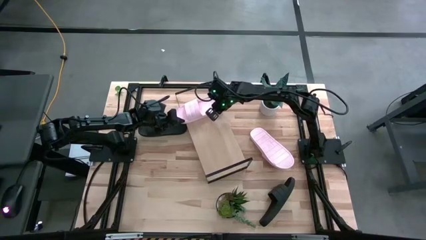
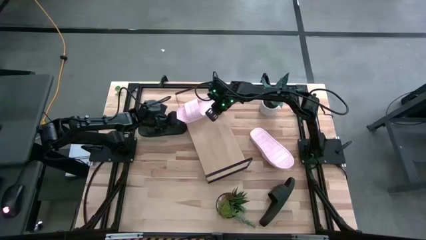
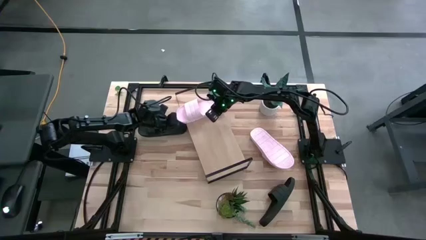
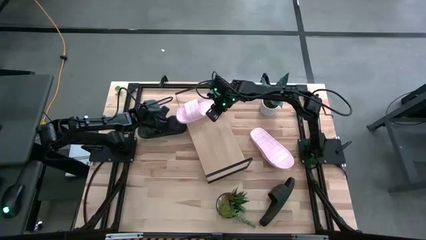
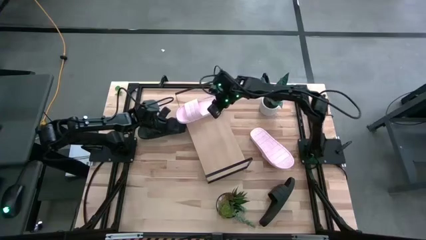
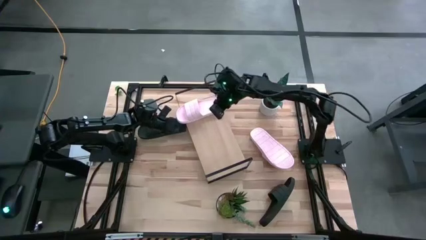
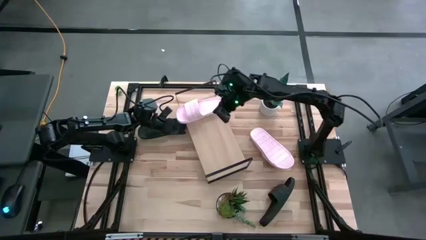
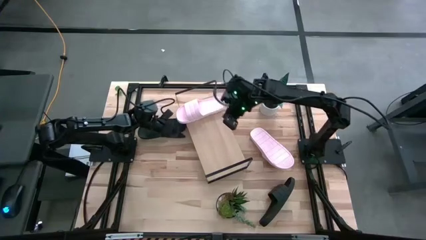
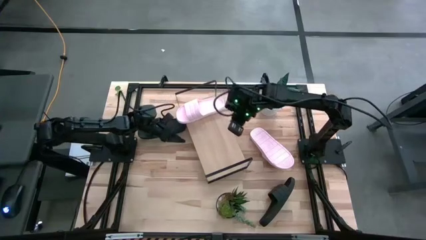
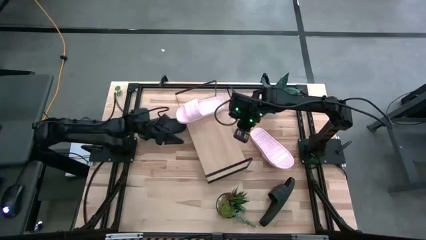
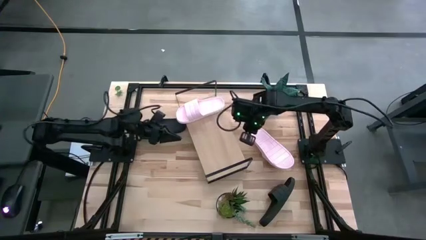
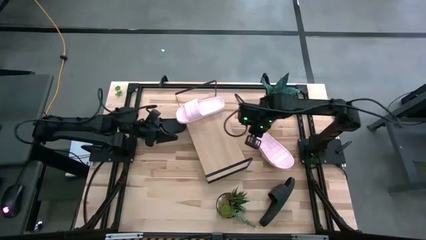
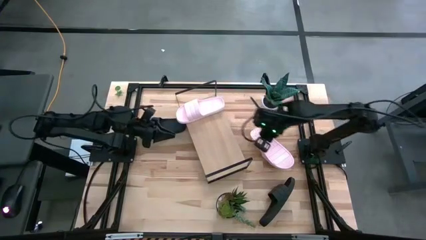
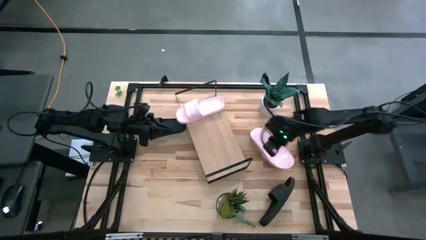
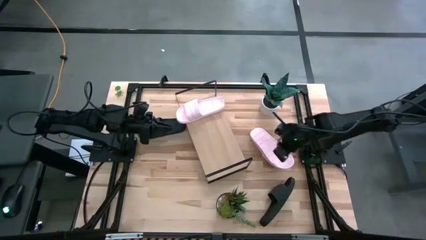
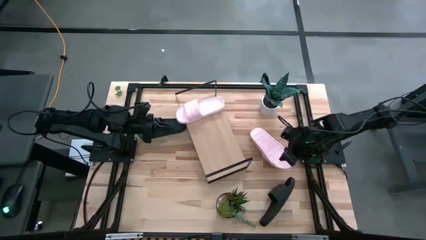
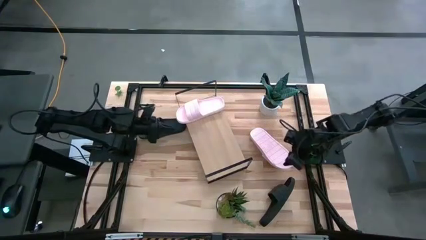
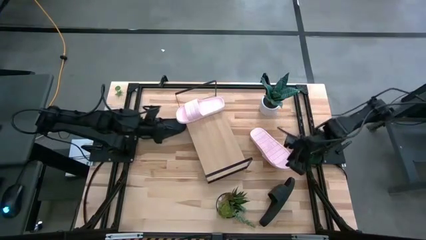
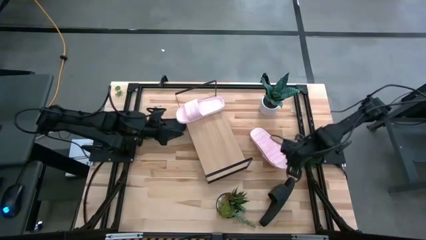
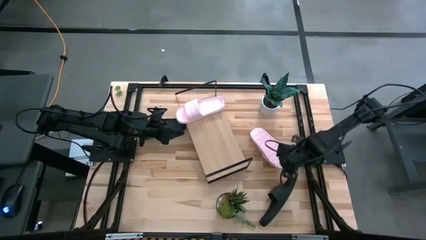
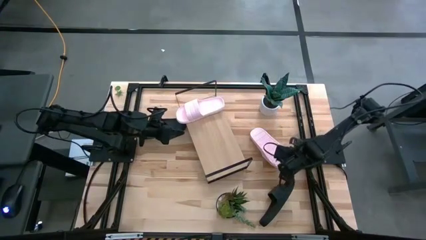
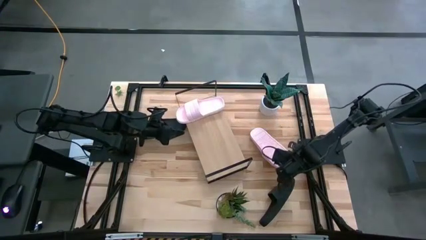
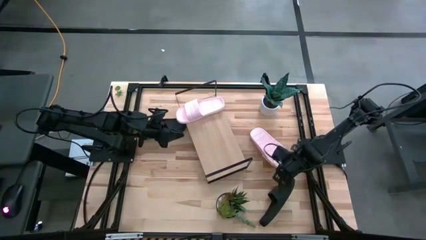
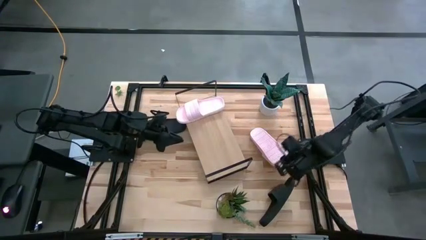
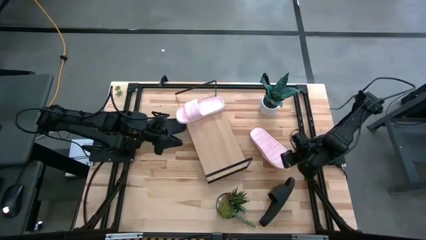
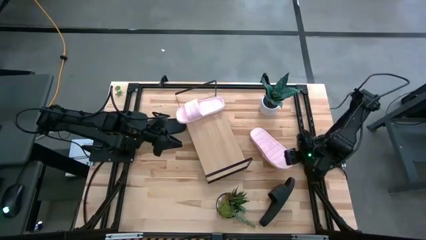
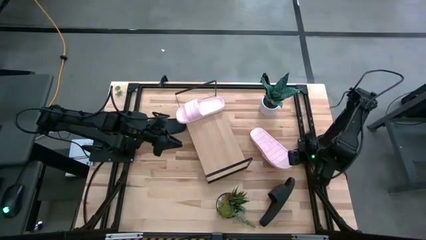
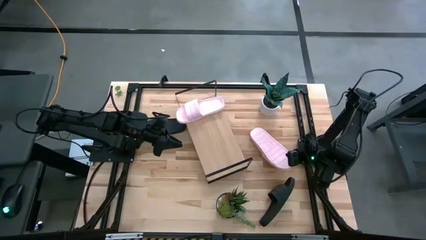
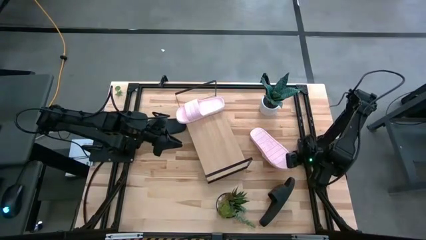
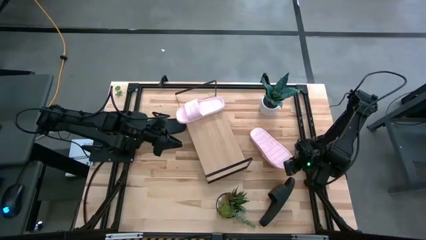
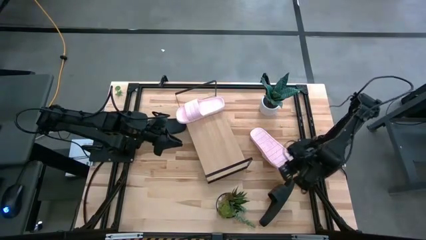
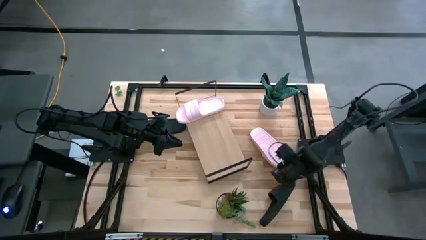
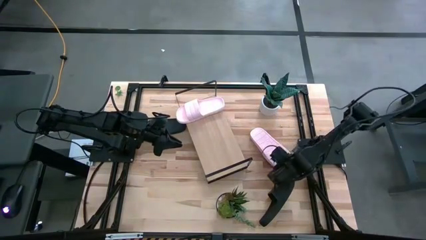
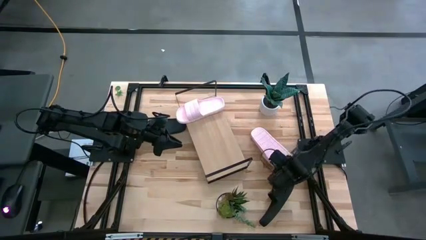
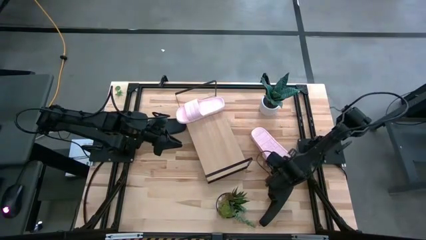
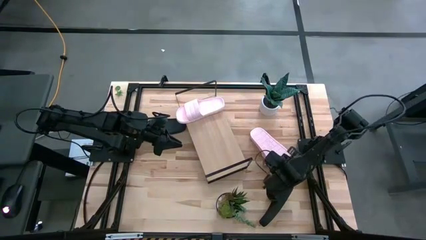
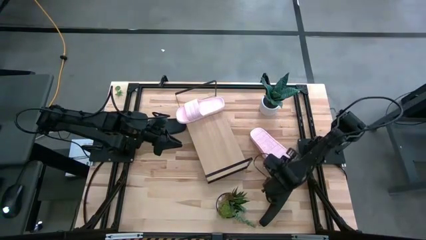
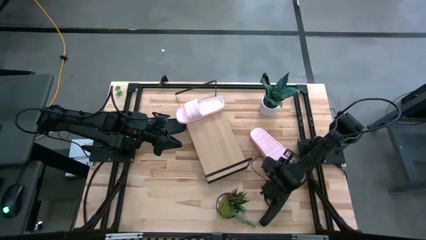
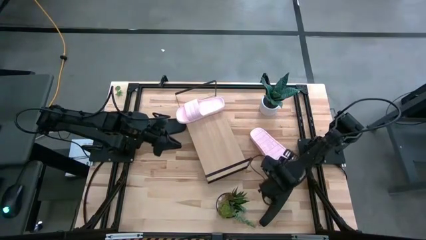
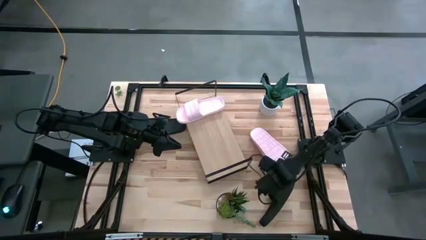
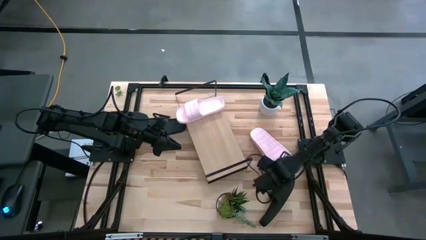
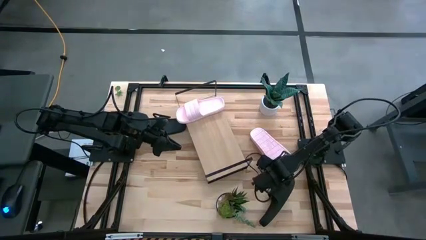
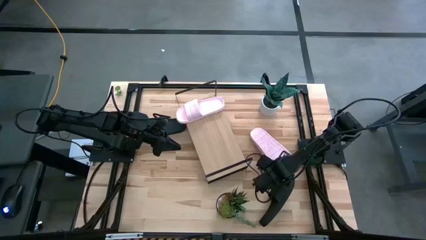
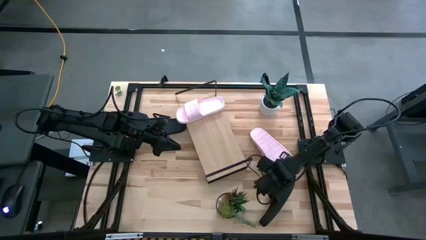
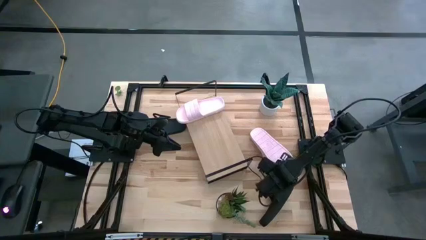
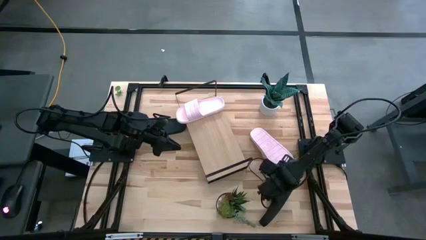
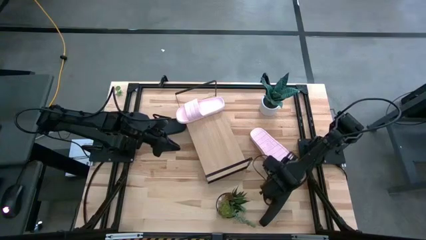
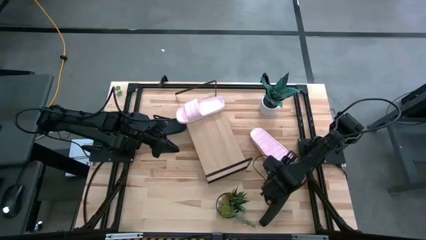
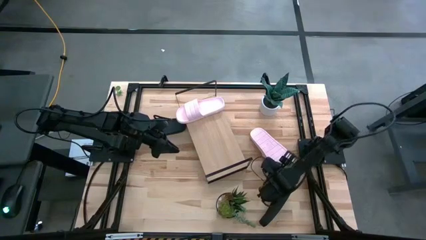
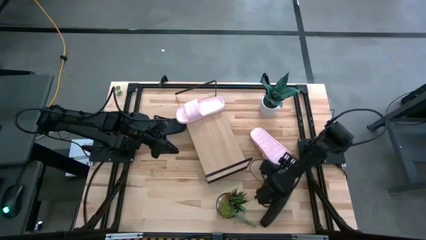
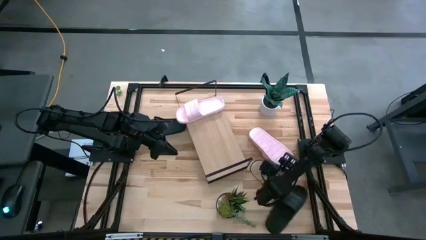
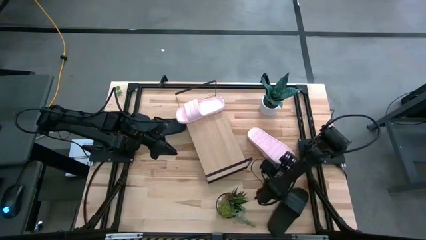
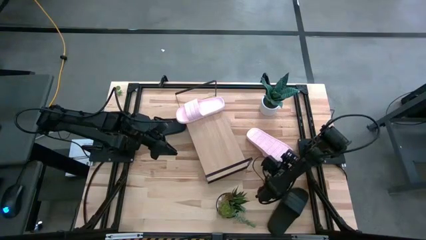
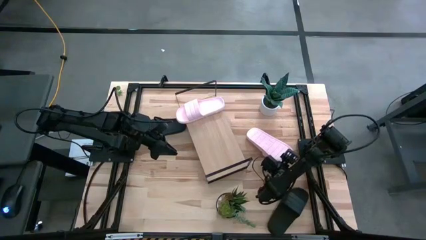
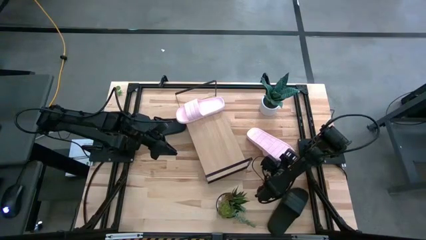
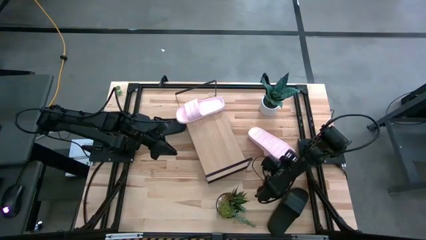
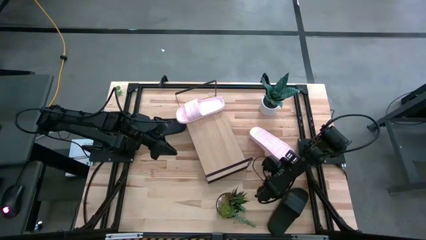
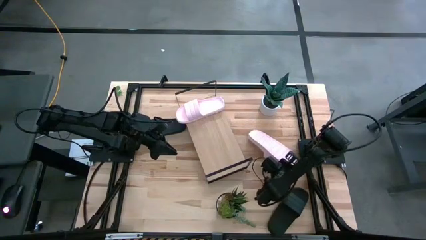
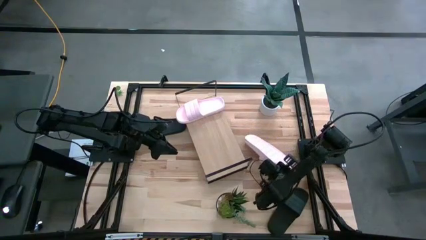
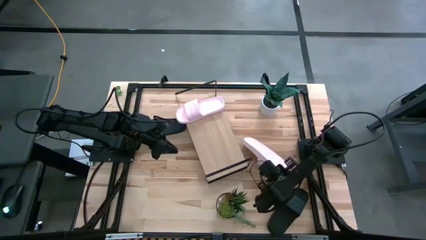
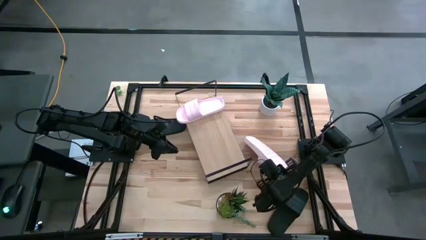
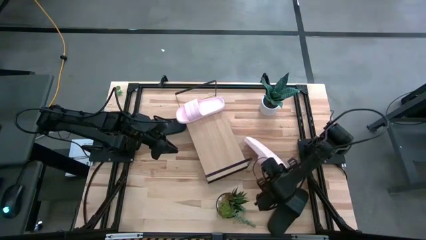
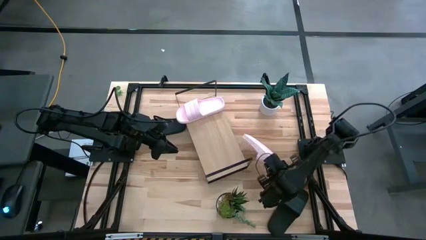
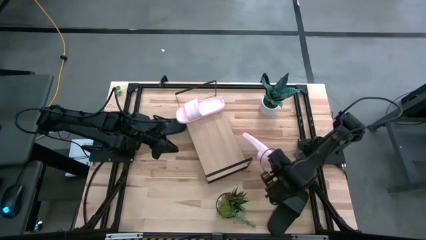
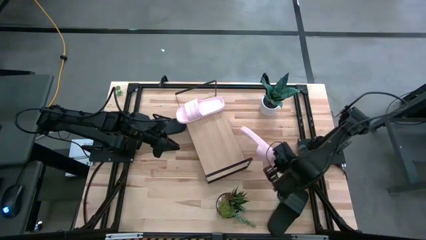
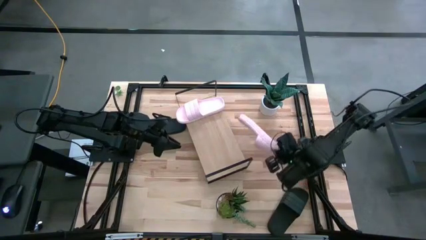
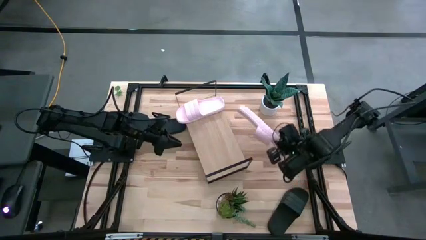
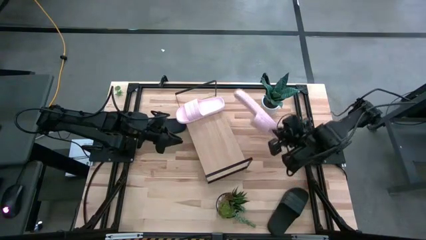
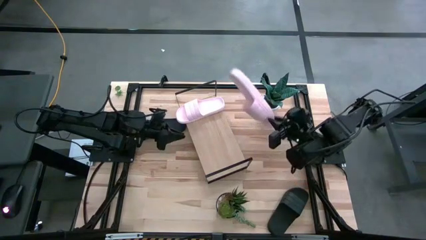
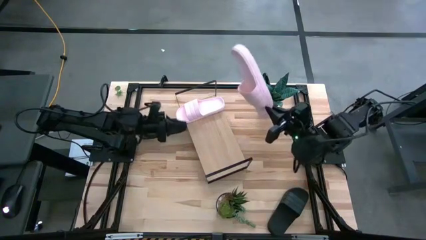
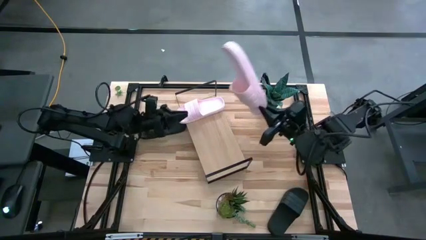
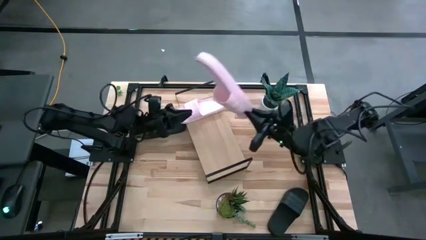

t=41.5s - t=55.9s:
Task: Pick and place slides into the shelf
Put the pink slides on the shelf

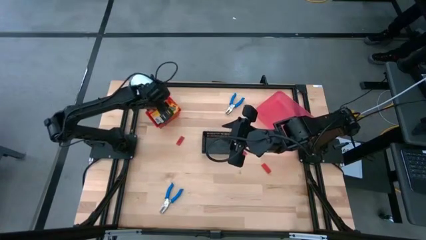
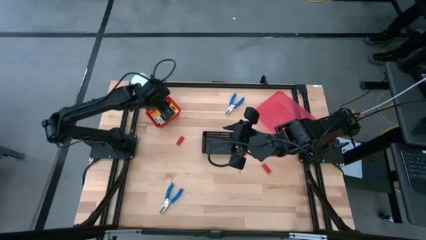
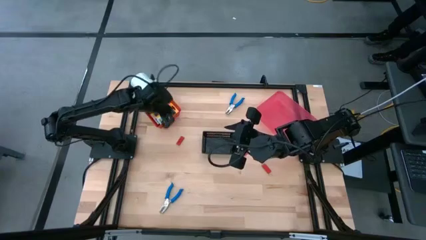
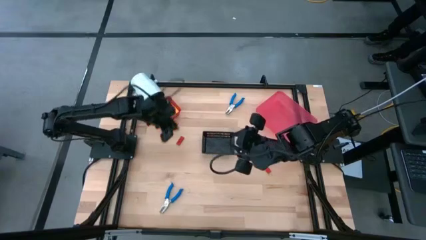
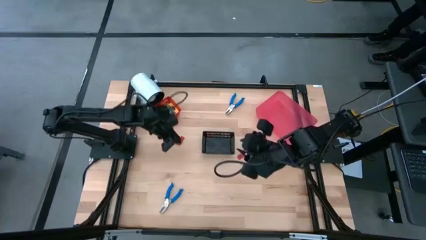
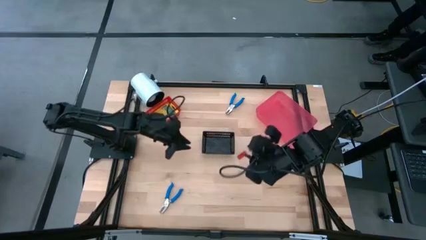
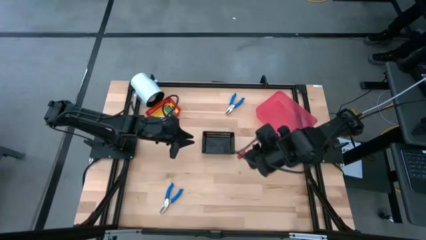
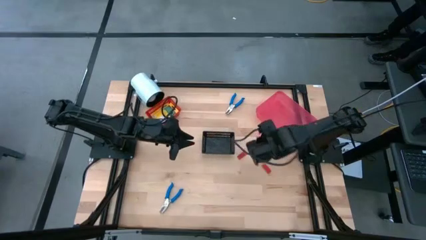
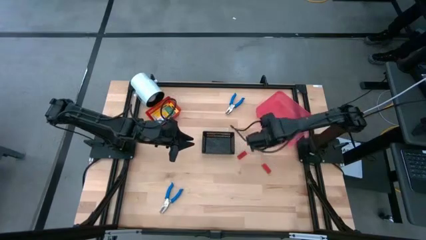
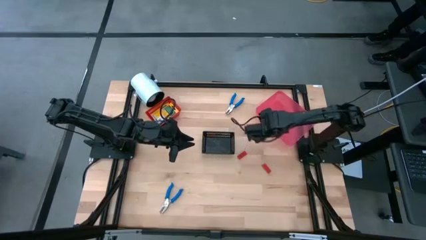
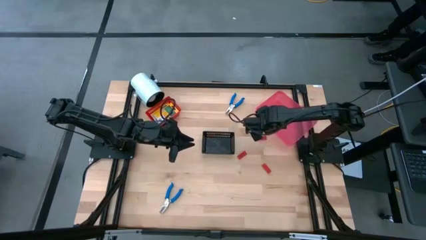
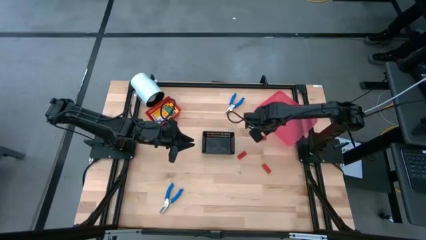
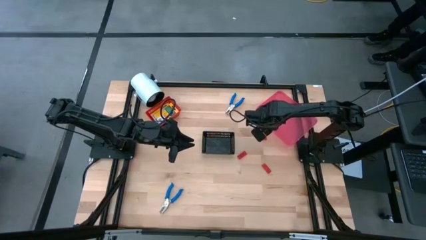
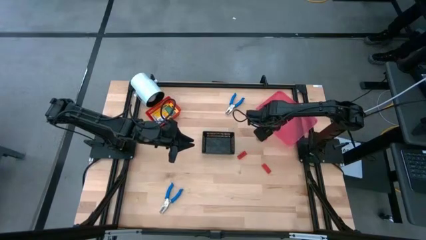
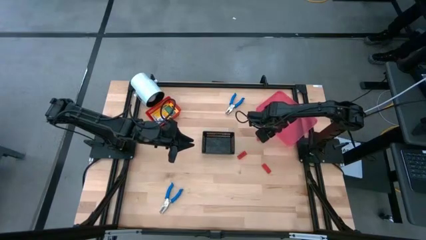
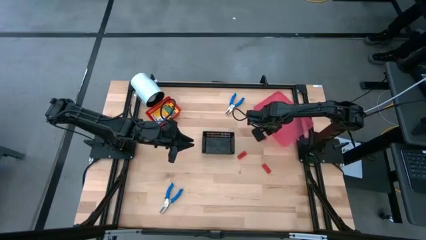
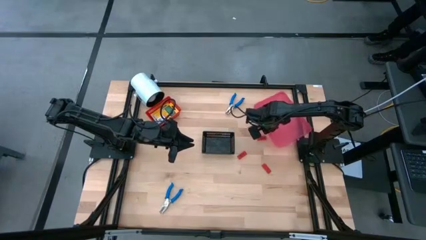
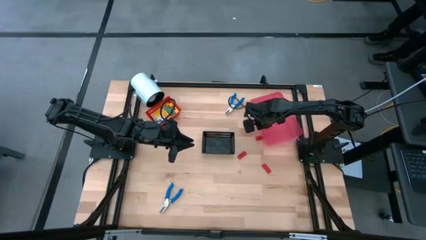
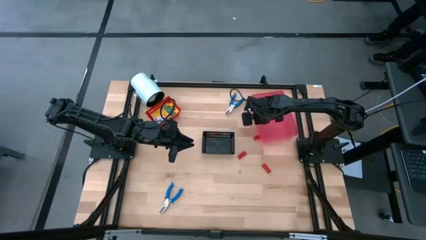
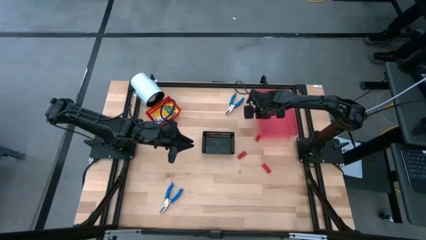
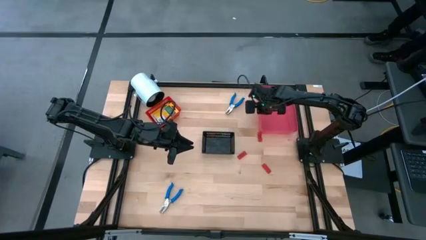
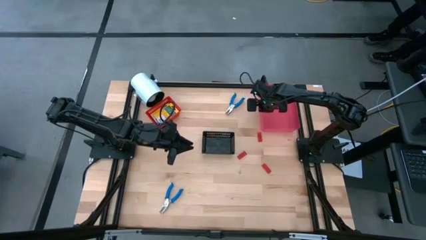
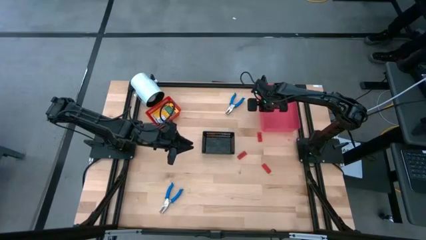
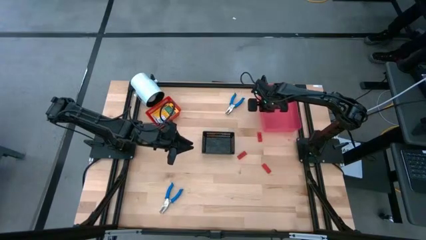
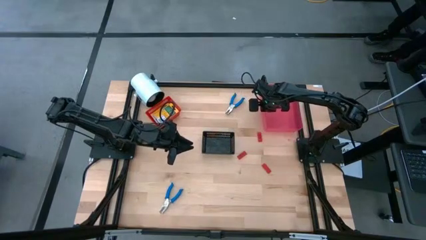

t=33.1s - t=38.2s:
Task: Pick & Place School Supplies
Adjust the pink bin
